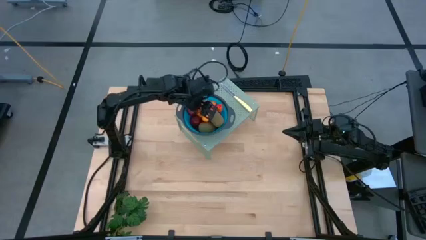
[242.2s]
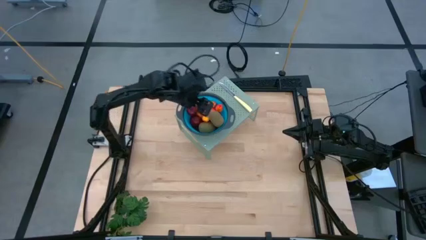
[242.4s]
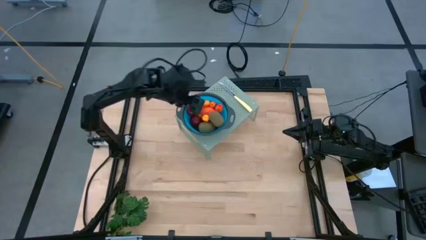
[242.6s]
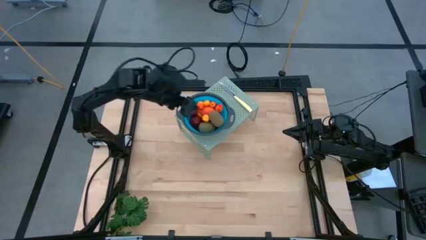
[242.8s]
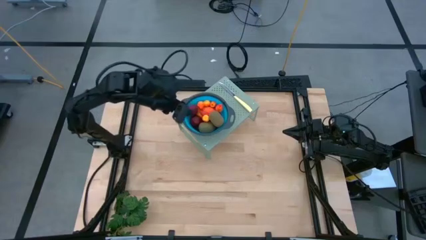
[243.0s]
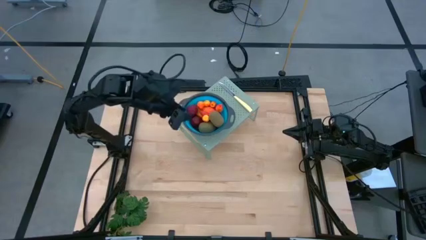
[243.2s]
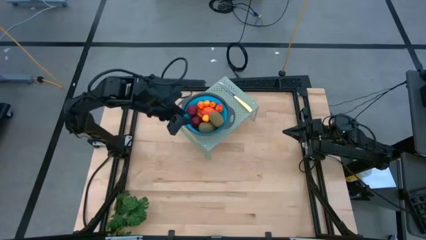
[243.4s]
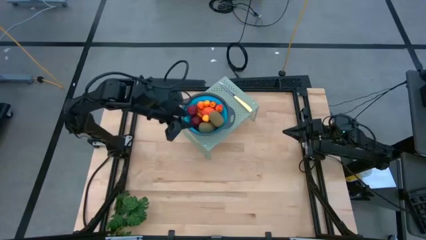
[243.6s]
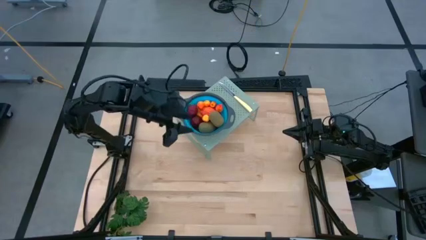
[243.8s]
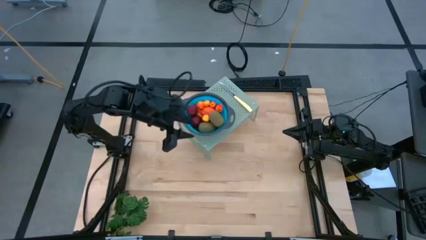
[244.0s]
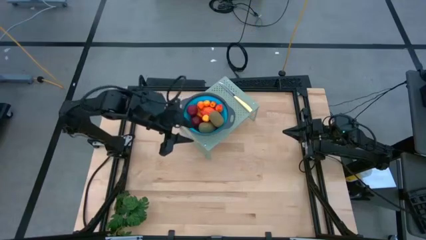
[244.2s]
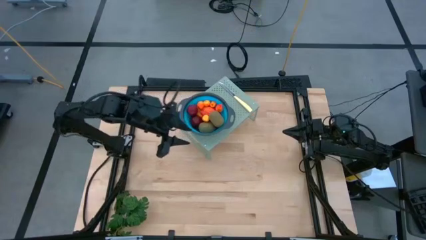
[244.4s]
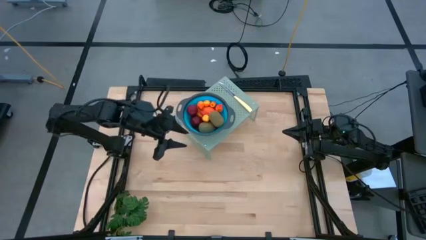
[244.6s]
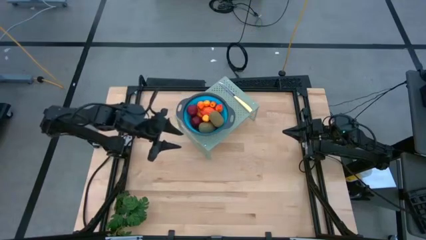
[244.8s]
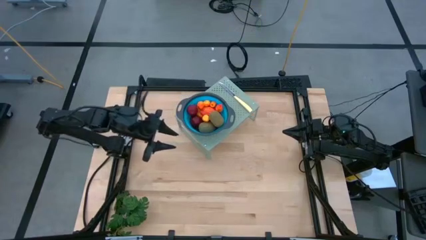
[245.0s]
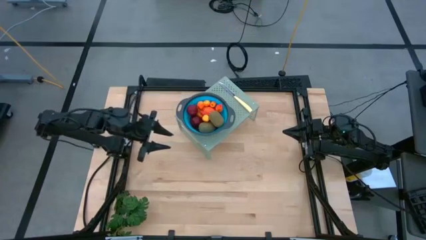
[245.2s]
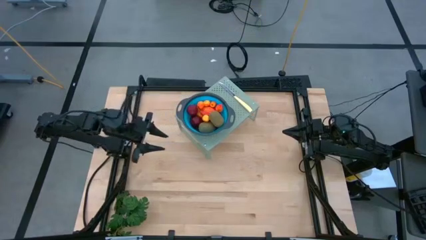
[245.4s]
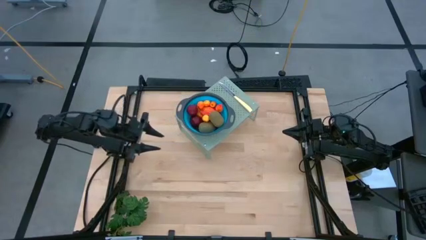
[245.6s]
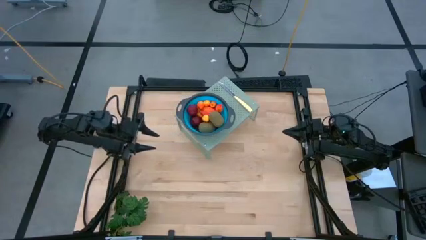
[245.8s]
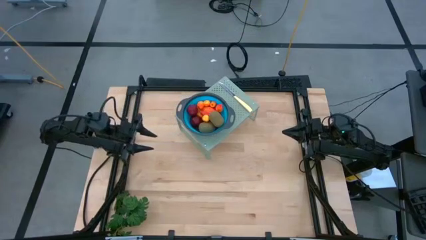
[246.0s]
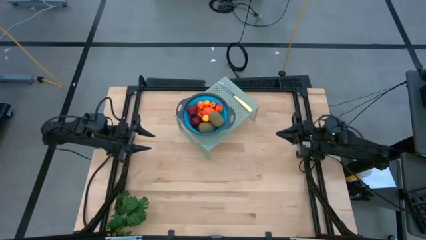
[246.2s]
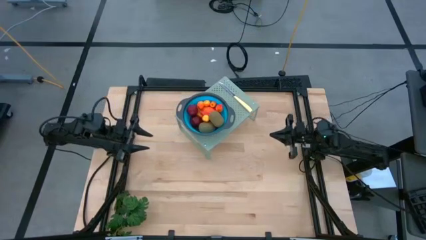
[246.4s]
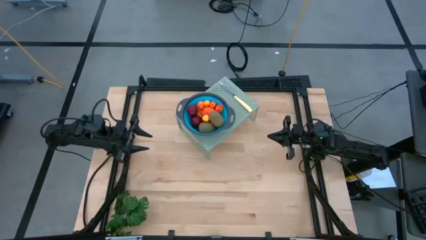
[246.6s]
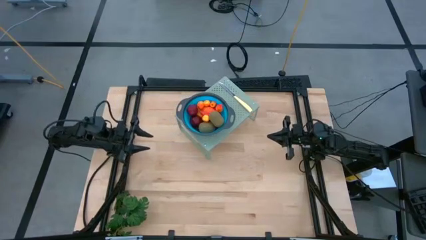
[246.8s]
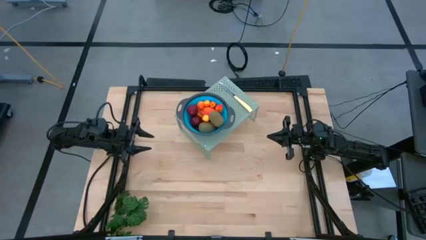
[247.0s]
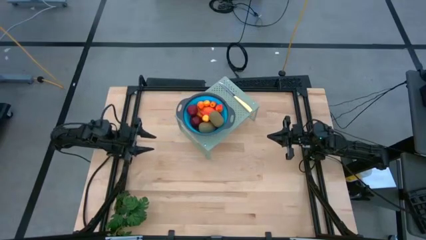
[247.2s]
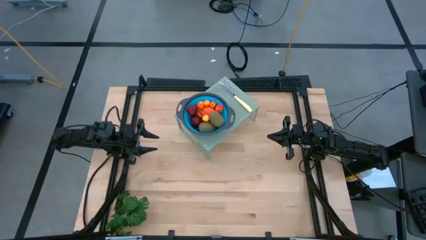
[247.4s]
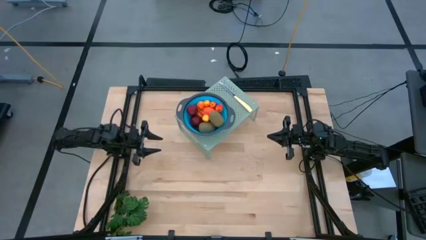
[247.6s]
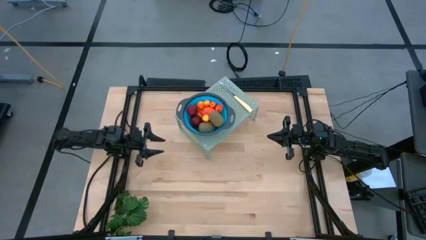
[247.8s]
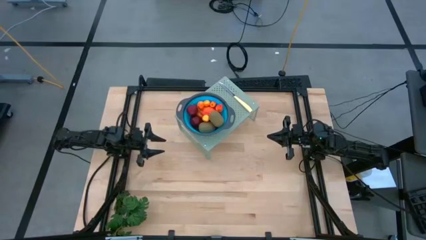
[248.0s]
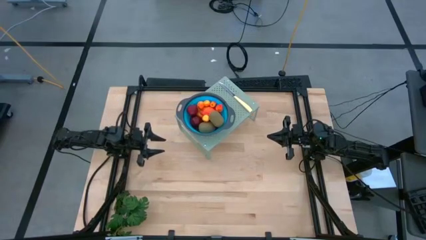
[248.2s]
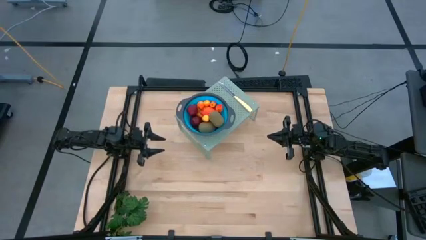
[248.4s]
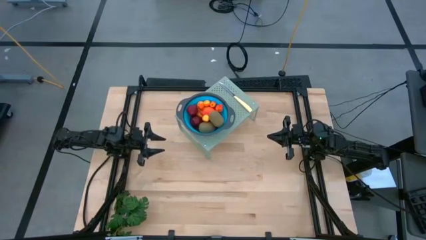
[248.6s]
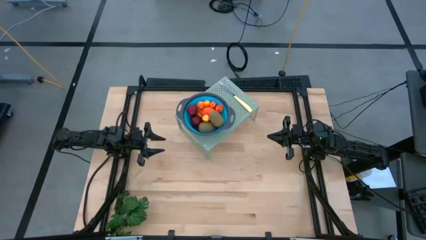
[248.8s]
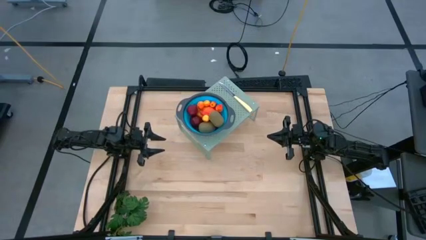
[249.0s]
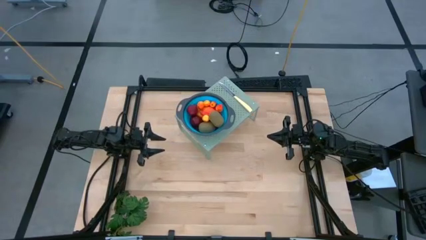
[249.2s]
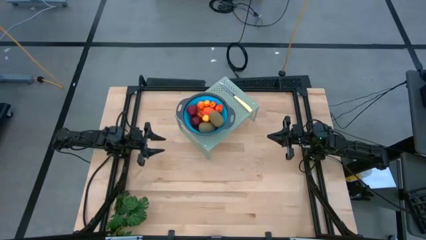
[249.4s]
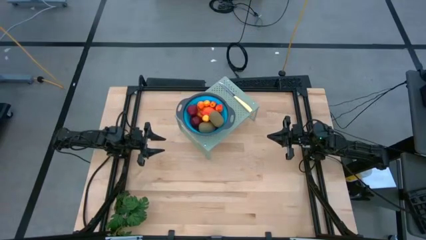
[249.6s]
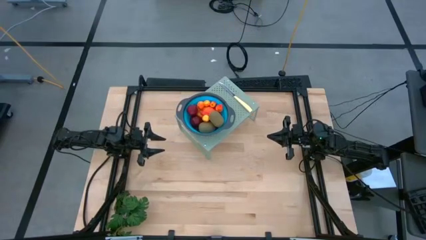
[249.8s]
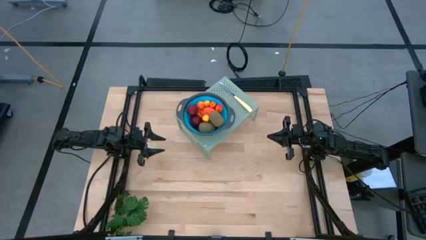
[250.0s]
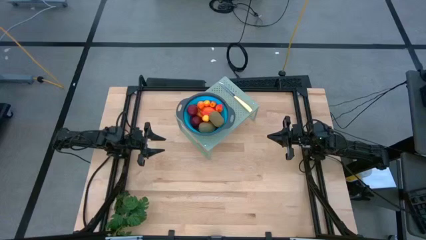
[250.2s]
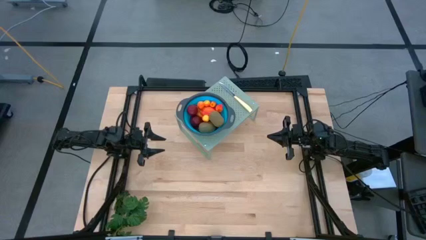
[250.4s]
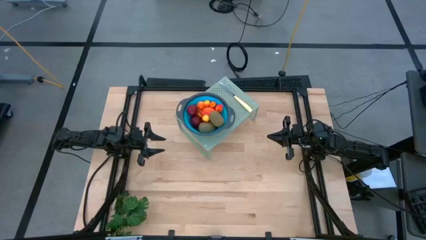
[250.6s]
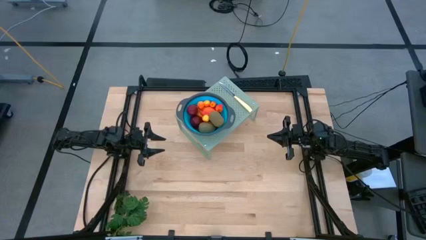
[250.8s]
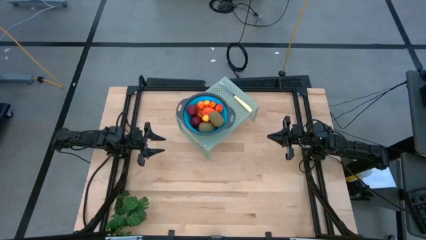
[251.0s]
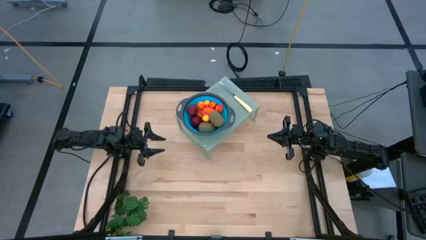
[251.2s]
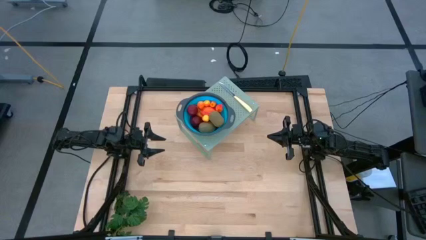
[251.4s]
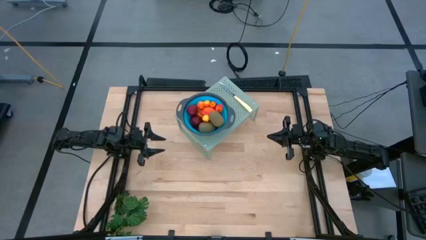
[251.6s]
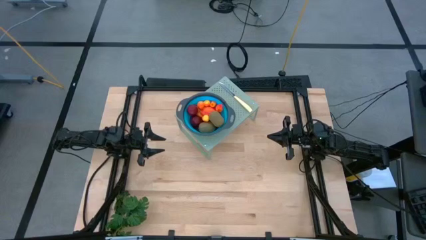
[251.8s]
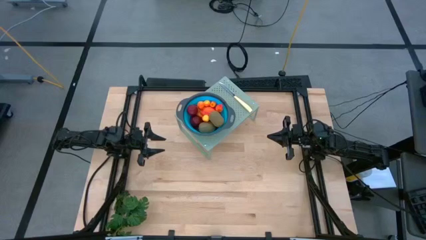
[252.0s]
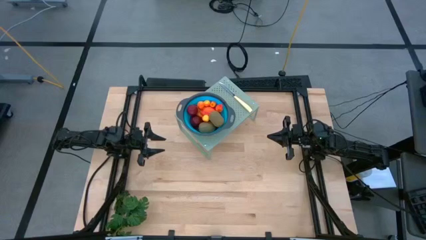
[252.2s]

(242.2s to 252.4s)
Task: Pick & Place Fruit
Return to Home Position
